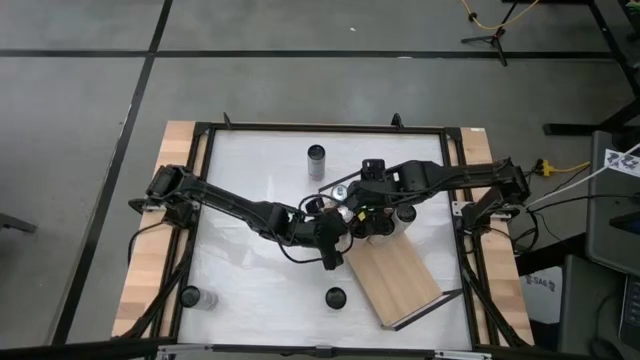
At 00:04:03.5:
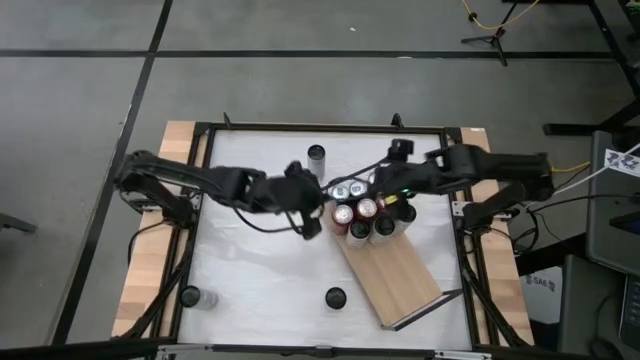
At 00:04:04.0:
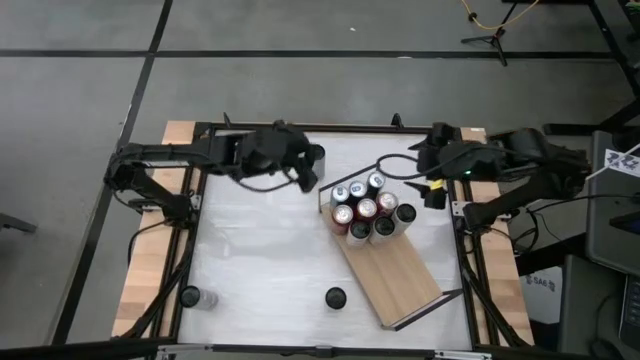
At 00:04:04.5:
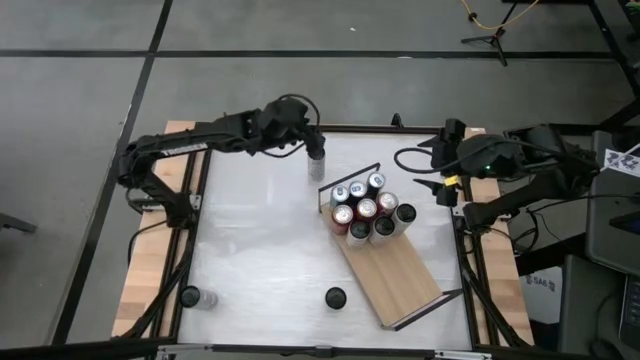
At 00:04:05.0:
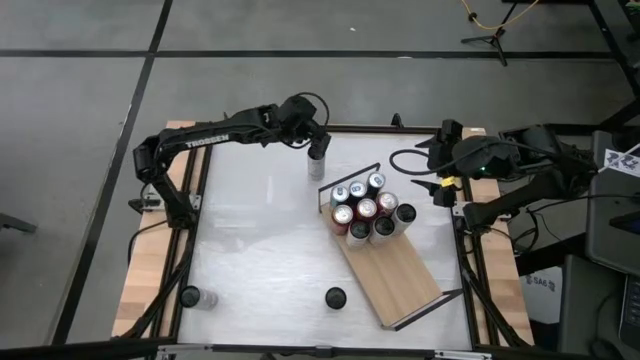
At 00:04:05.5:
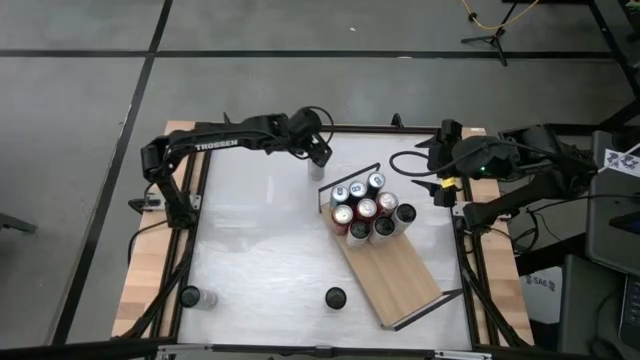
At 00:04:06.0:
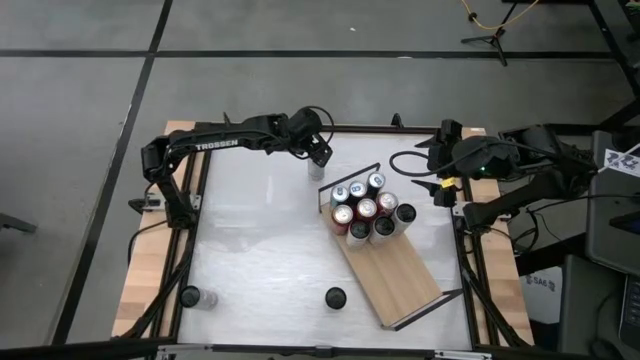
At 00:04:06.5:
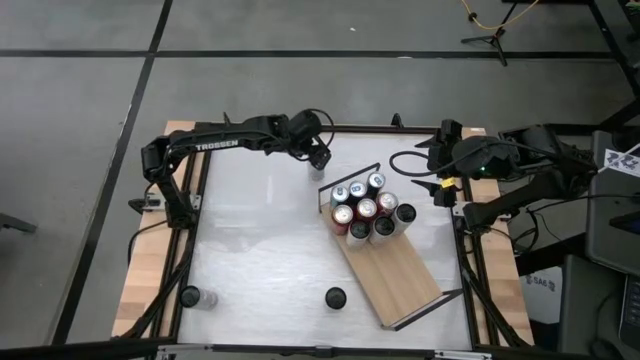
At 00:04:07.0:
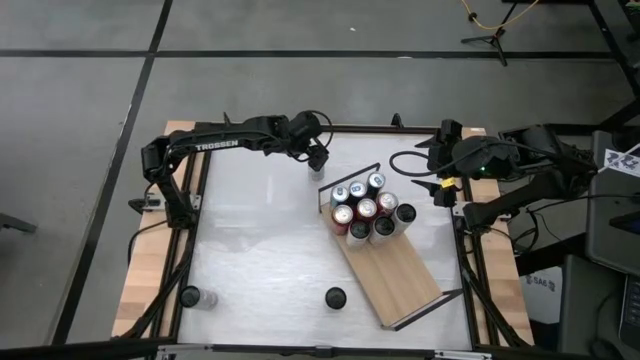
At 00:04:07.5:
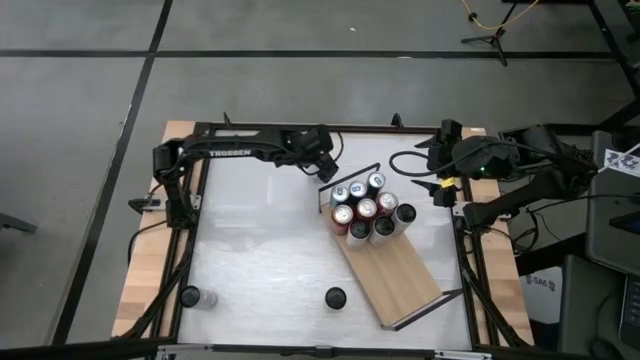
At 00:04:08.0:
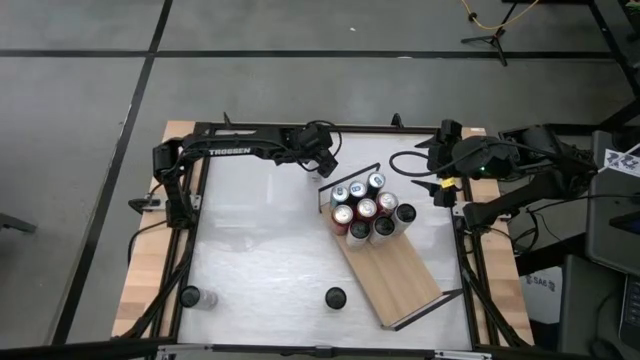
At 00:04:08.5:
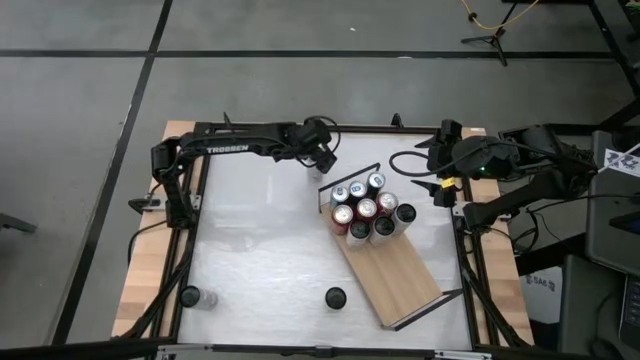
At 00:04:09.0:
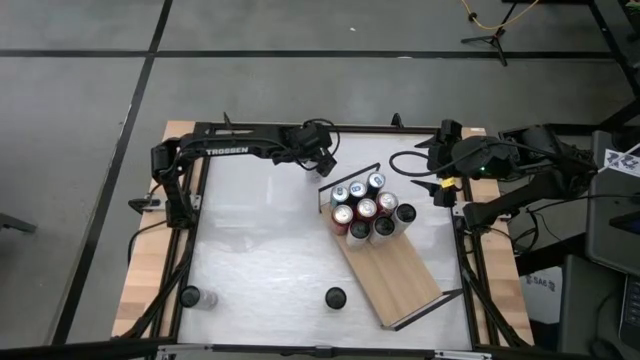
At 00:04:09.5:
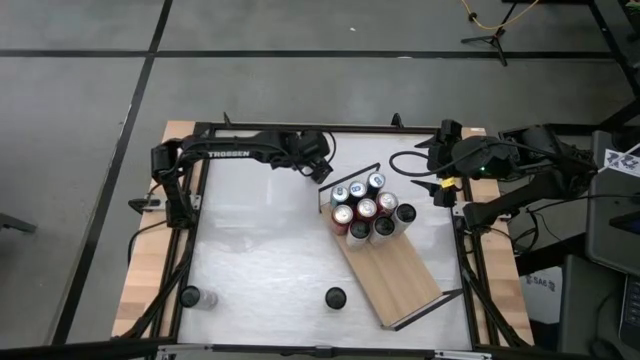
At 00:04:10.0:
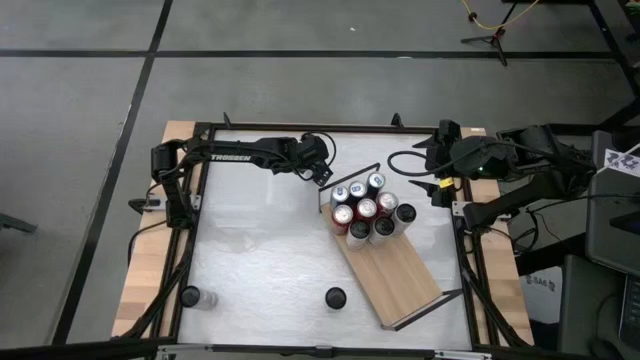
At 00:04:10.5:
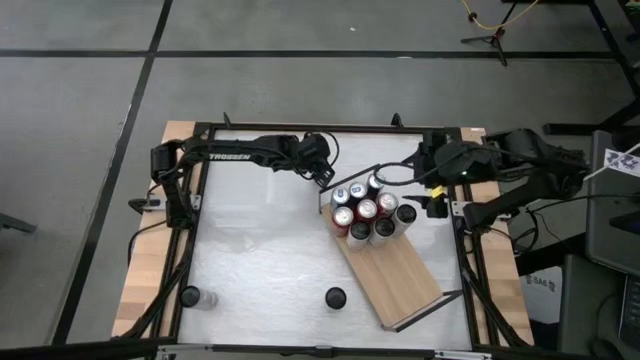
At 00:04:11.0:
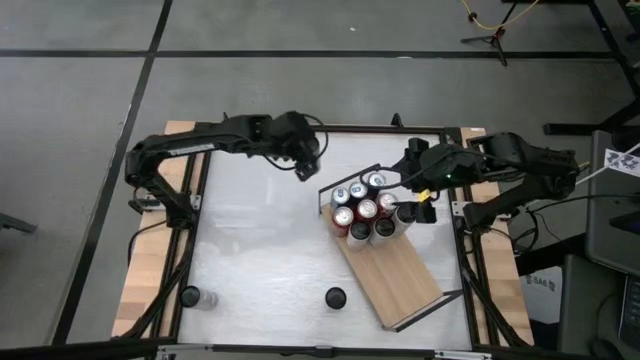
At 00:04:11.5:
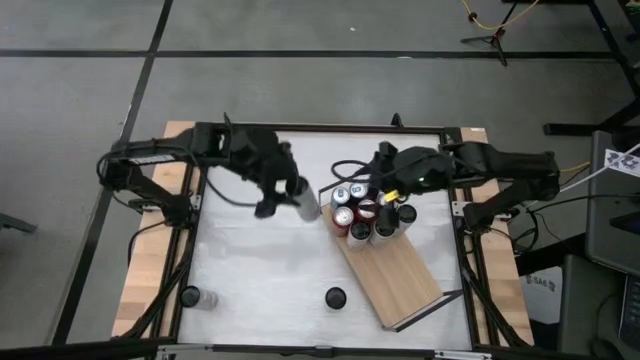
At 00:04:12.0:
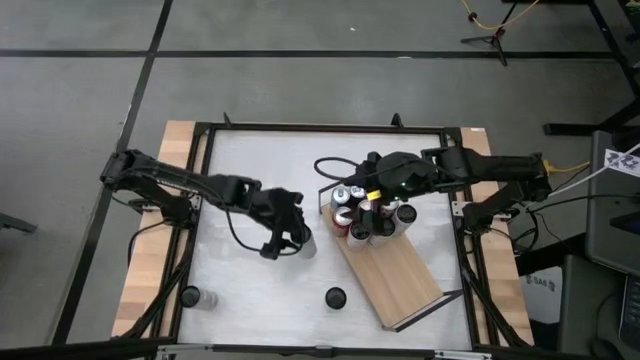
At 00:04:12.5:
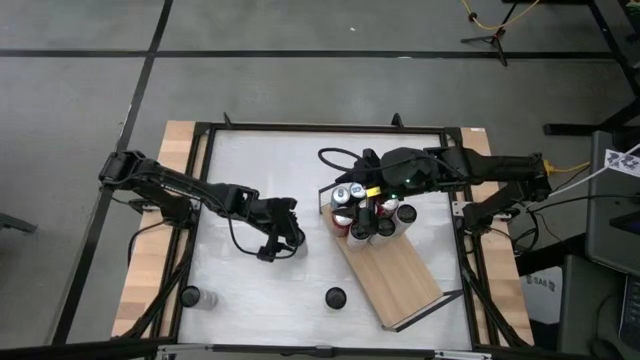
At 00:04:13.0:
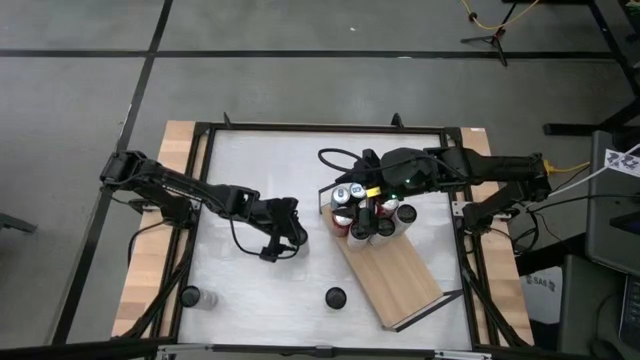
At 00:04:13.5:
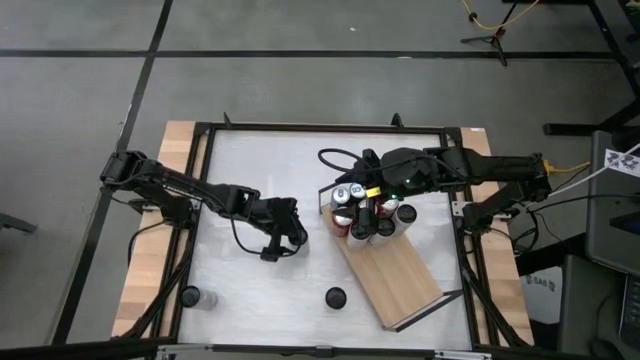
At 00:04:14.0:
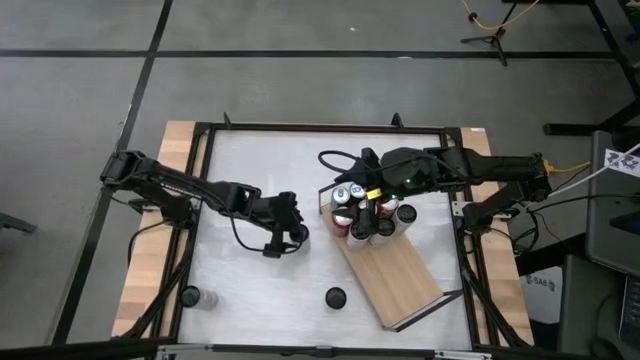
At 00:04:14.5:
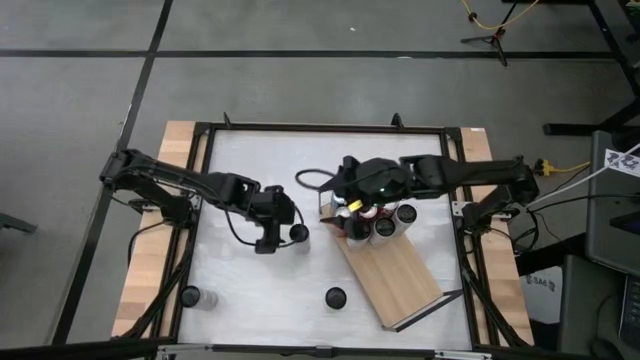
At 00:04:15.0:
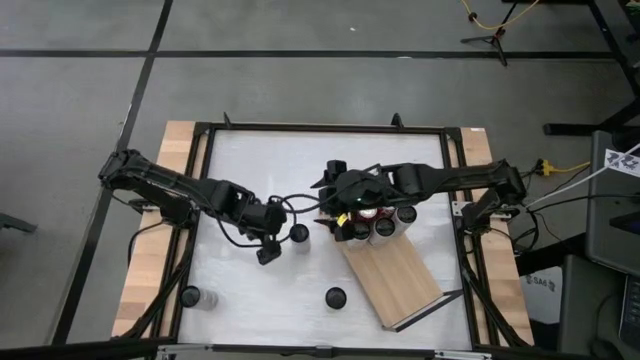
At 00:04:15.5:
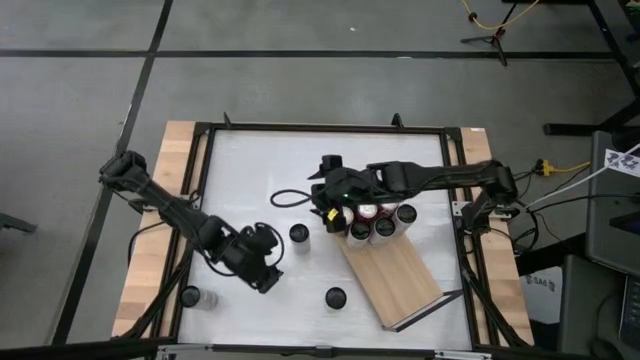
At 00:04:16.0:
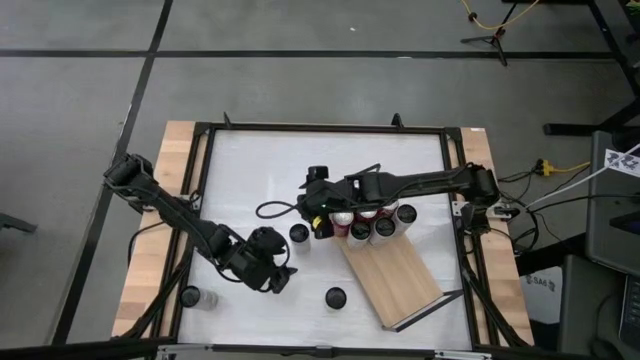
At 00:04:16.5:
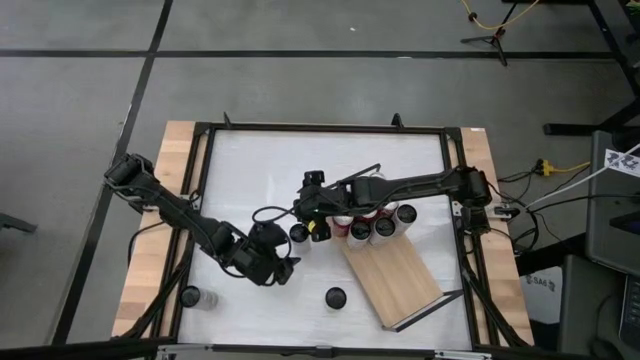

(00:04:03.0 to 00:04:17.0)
Task: Place canned beverage on shelf
Put the white pink soda can on the shelf aligned with the other white pink soda cans

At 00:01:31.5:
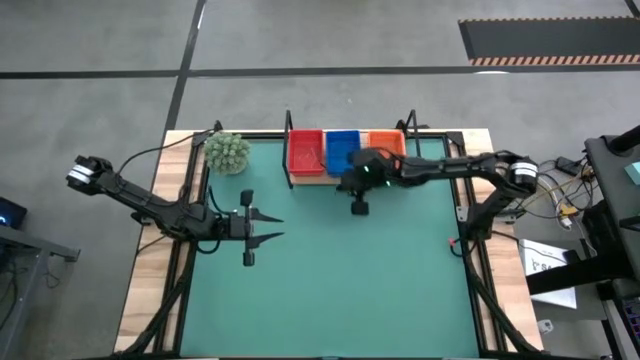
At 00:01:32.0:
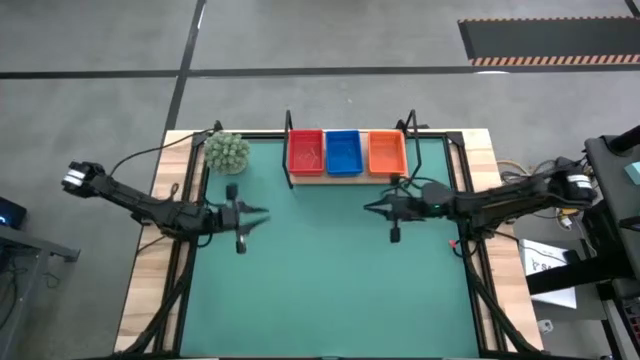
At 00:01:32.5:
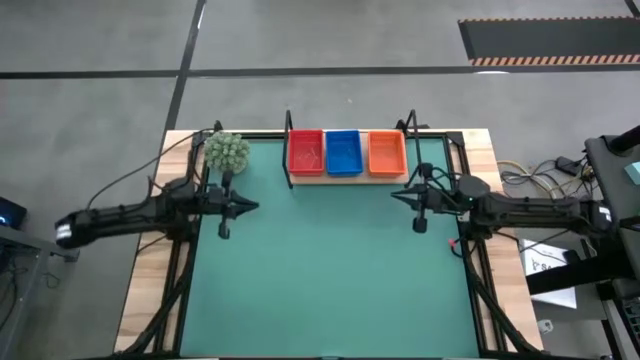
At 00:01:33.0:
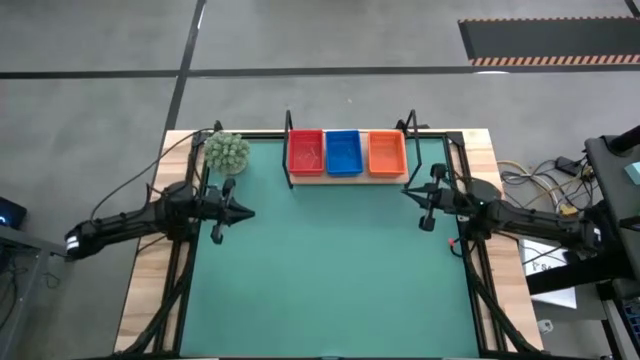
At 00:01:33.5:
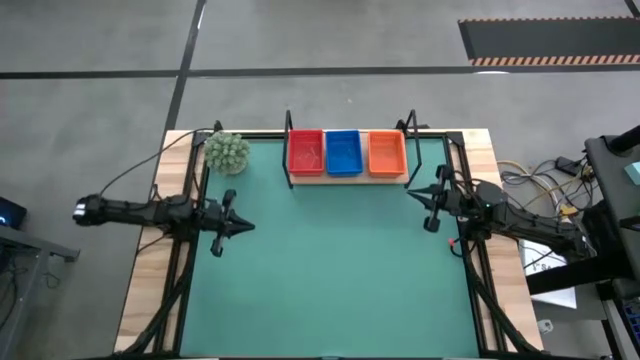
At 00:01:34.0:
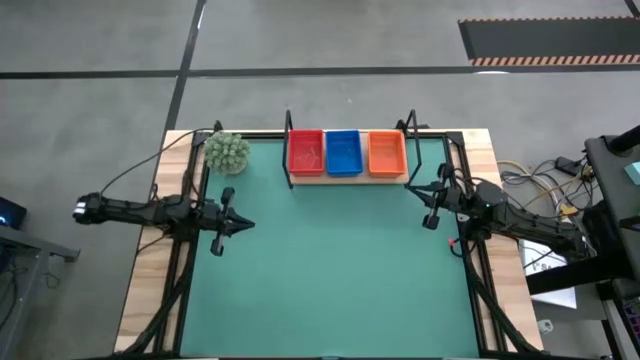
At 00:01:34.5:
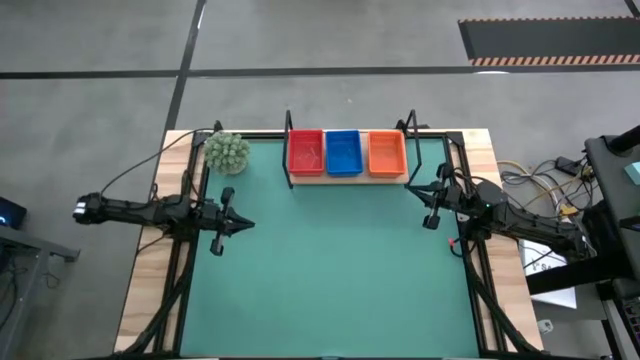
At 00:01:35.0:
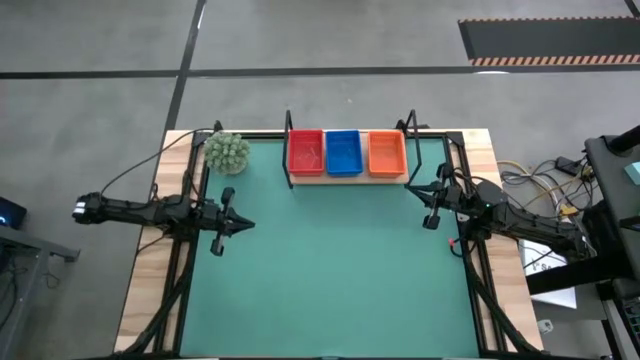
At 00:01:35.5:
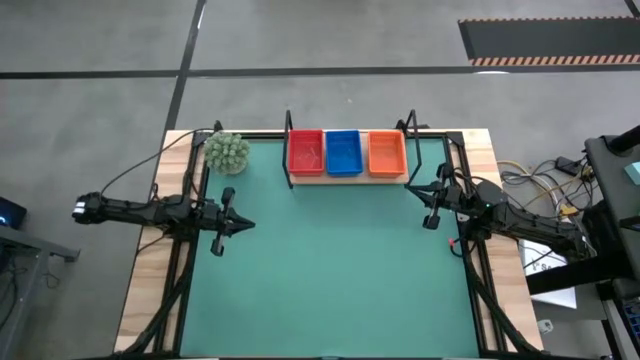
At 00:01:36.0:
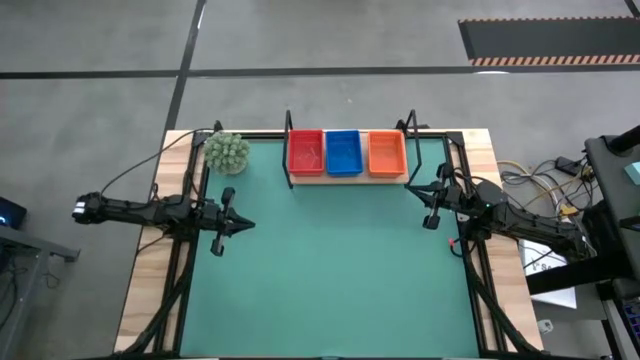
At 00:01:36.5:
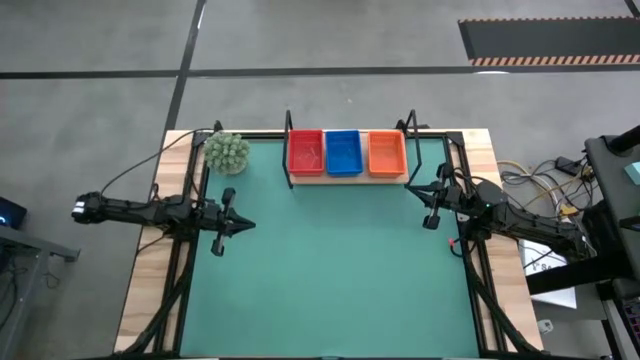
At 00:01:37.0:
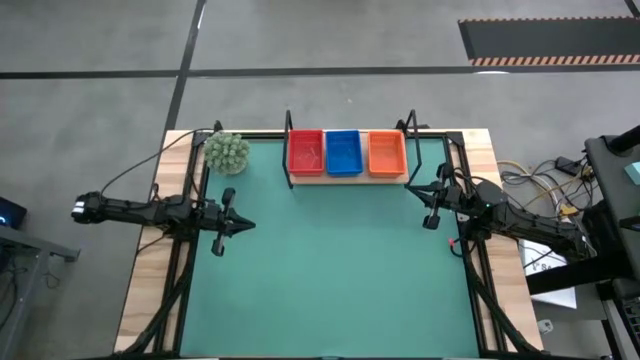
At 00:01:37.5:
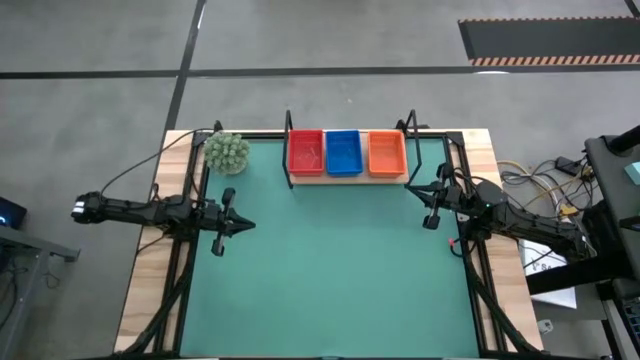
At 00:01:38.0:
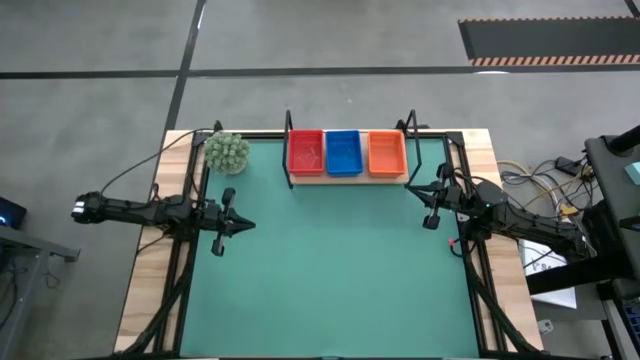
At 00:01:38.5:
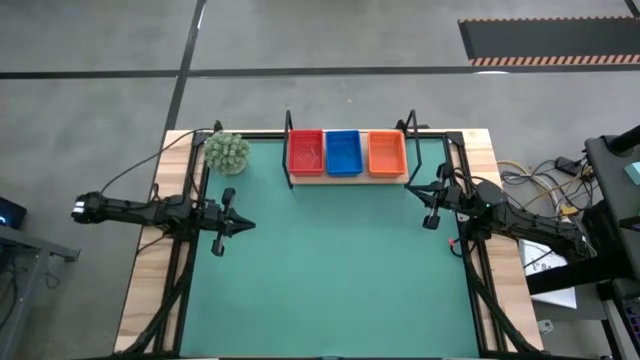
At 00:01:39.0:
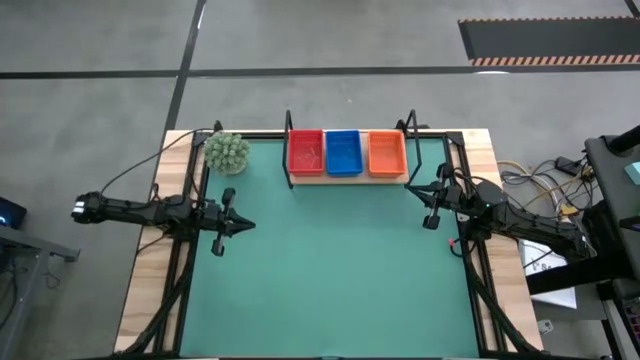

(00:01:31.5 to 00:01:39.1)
Task: Stack baskets on shelf by color
Return to home position
